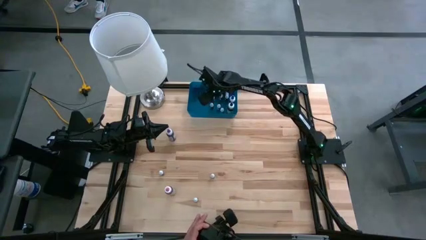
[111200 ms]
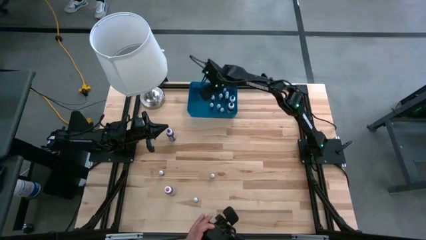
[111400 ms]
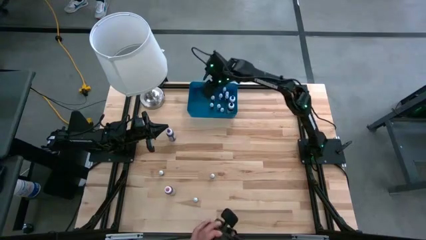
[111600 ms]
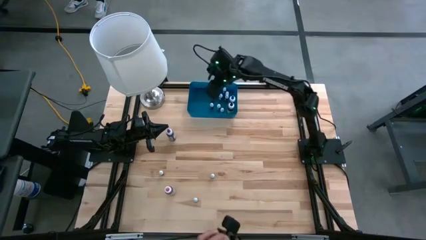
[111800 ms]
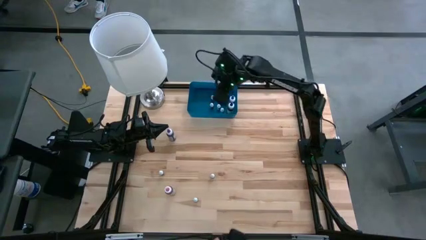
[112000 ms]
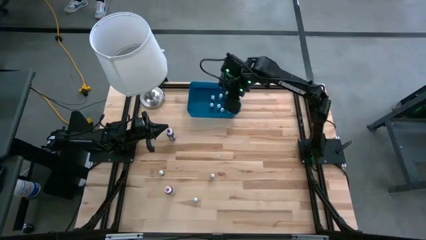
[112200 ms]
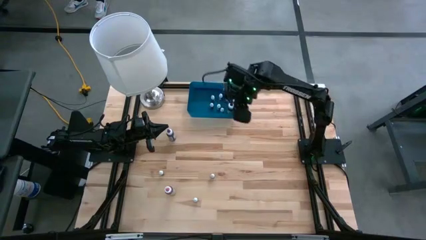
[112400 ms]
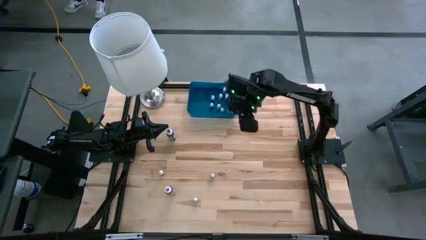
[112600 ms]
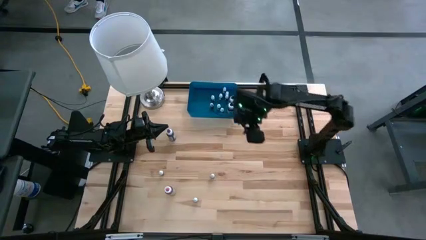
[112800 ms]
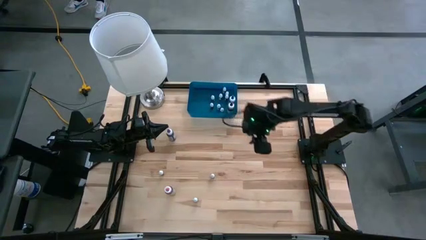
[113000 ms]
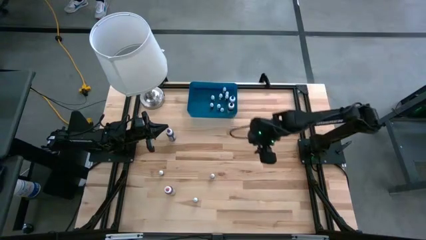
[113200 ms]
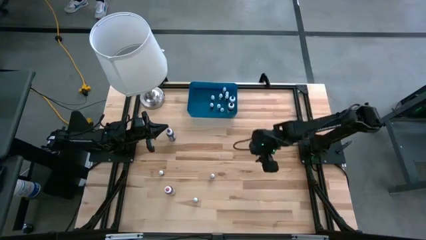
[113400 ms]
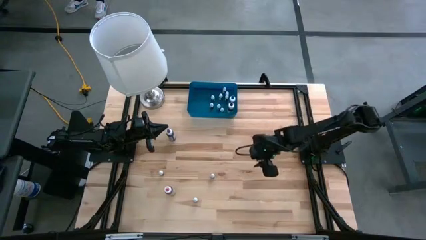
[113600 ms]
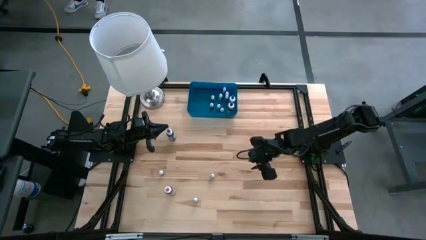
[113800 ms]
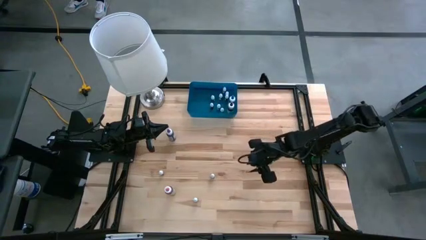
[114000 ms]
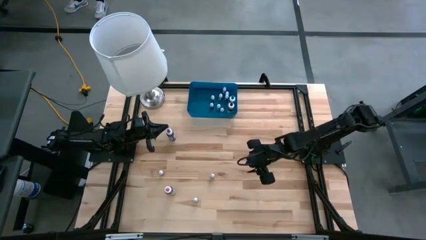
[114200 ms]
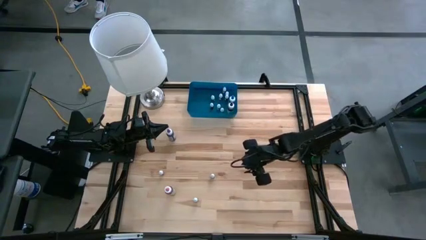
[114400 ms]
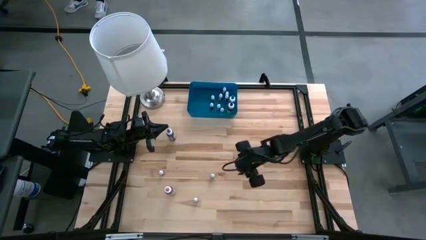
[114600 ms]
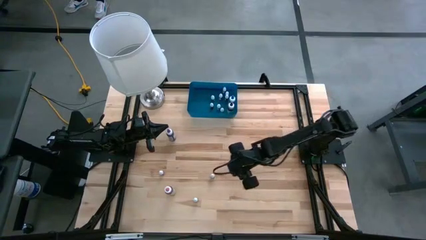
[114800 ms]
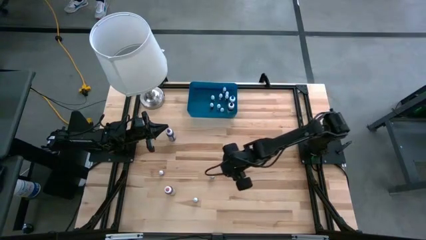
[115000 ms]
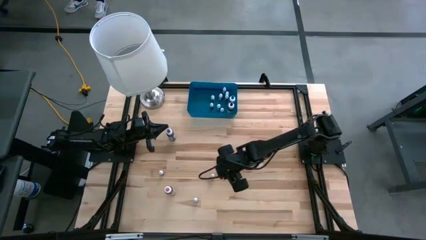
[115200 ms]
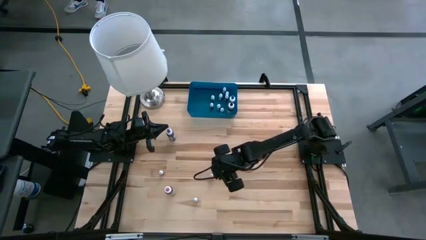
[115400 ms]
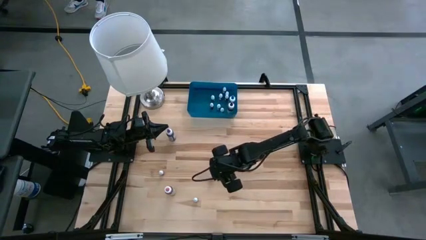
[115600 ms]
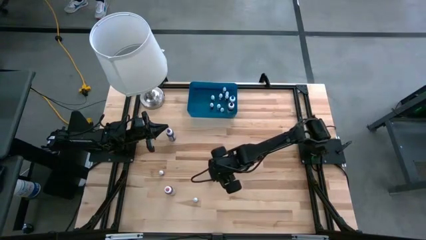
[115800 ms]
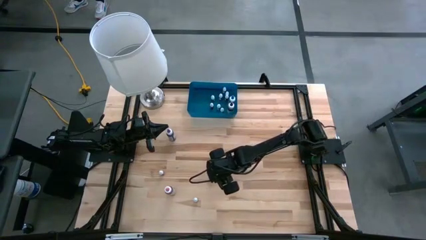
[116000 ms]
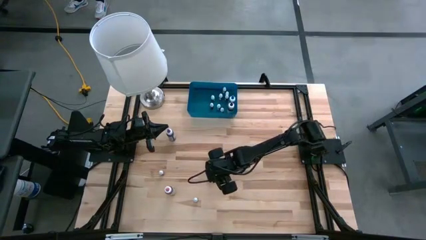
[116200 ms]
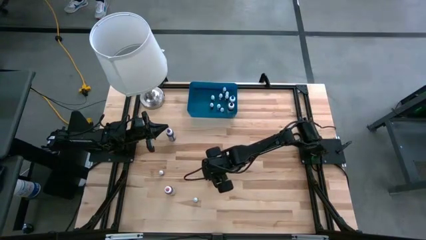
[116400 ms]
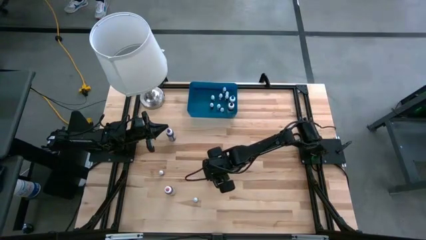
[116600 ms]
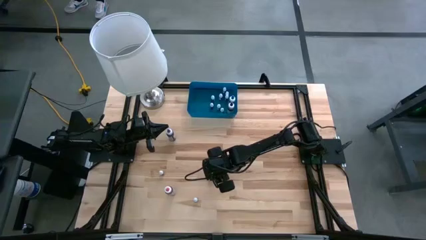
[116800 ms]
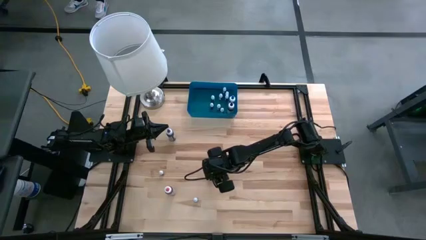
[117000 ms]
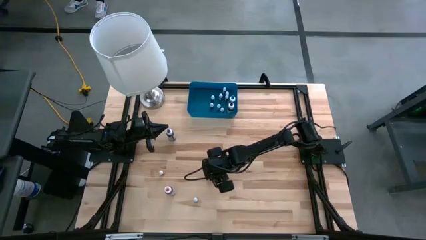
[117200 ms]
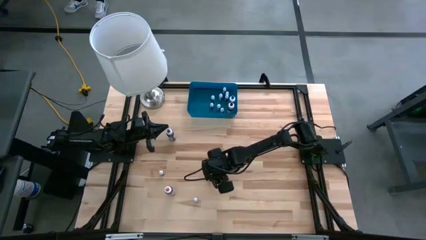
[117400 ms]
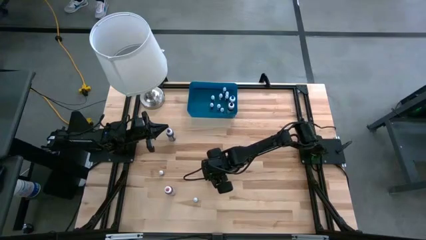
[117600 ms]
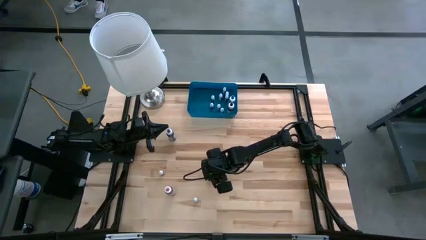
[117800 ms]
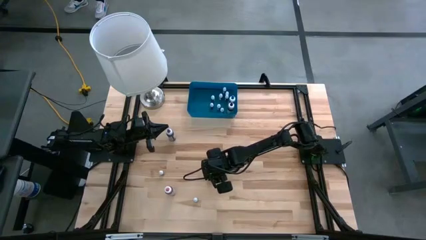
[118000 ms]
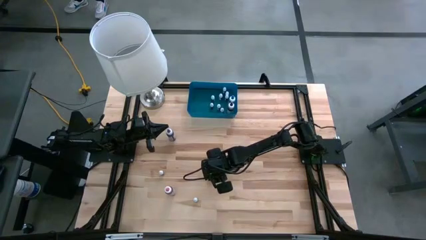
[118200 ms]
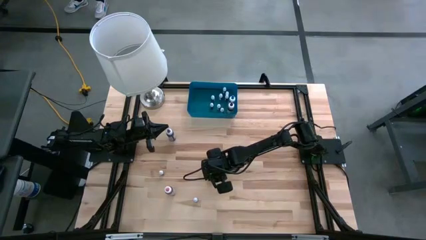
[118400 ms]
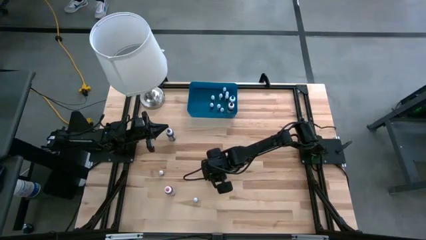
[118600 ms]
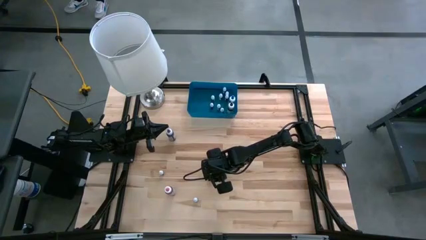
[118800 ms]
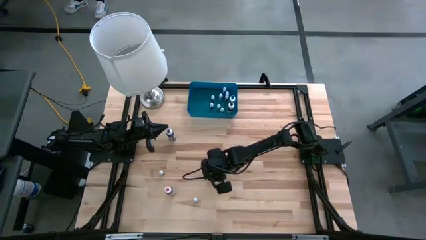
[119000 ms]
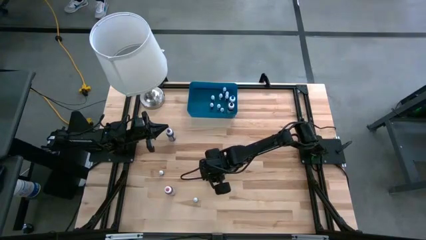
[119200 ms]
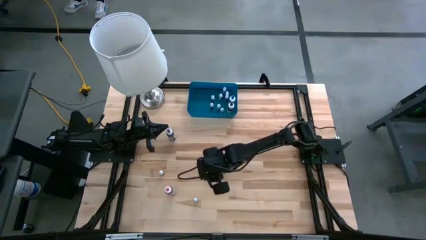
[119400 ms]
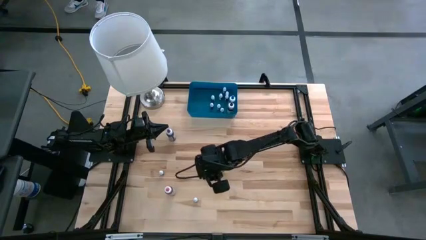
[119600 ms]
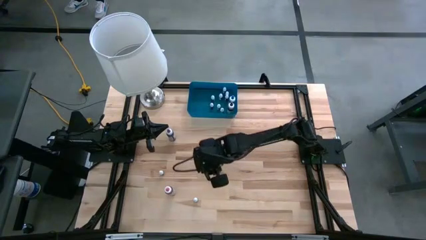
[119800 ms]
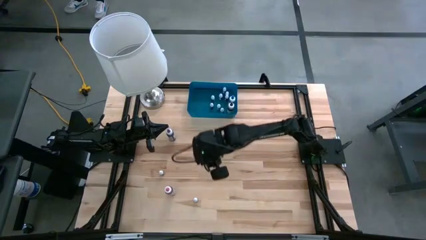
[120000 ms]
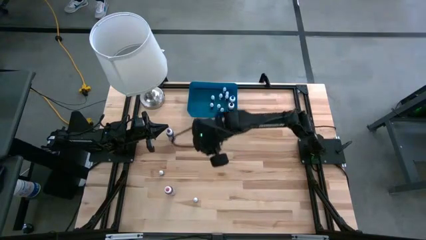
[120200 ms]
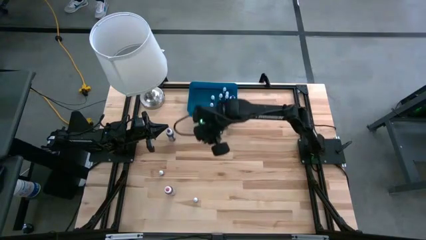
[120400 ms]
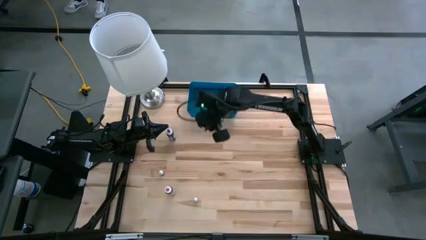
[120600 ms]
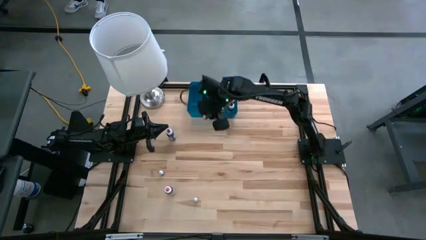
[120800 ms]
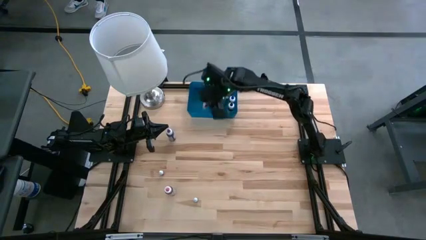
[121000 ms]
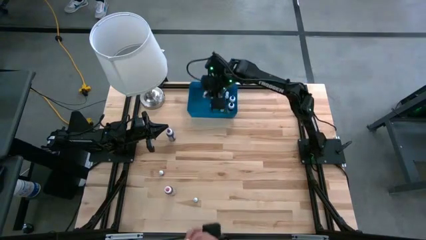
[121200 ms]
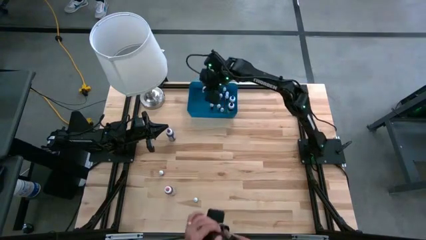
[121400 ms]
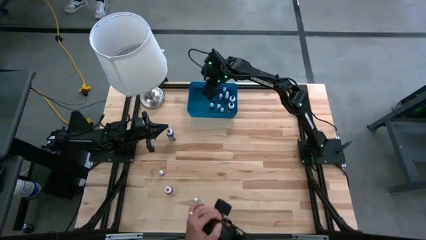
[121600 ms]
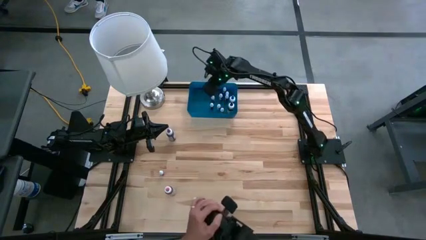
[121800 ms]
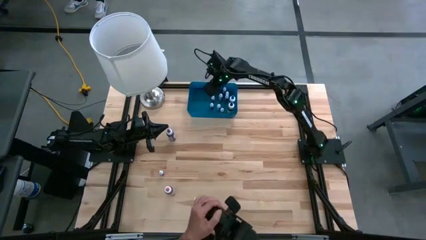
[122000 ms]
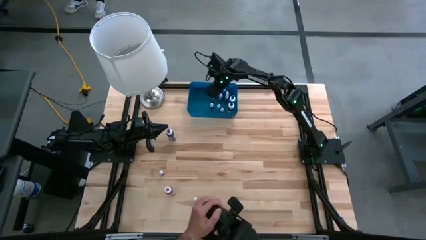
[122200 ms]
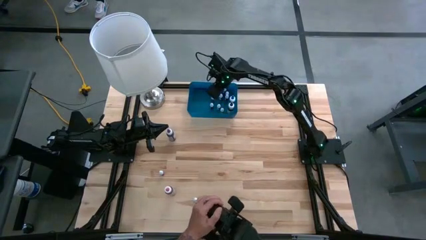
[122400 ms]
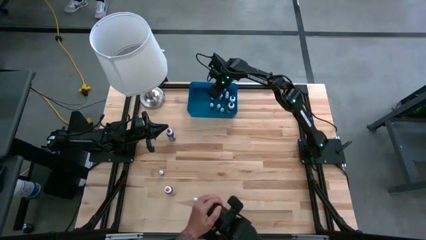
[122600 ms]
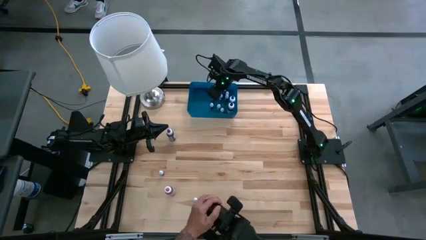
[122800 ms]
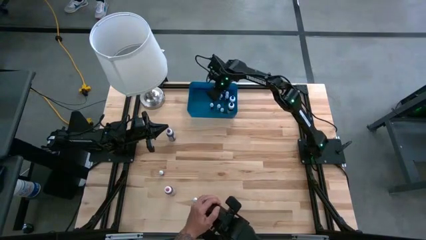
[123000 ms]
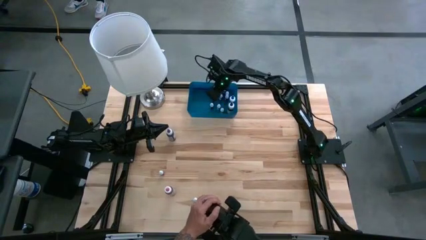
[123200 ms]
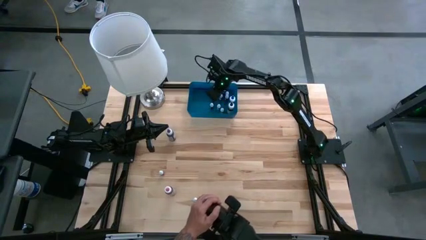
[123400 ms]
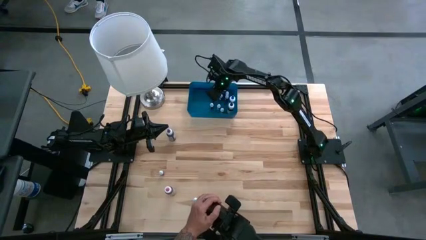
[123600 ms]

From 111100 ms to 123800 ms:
Task: Pick & Place food coloring
Put the small red food coloring bottle into the blue bin
